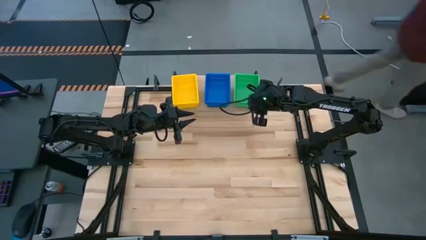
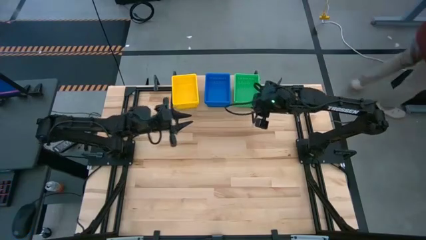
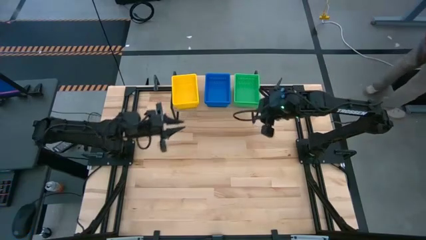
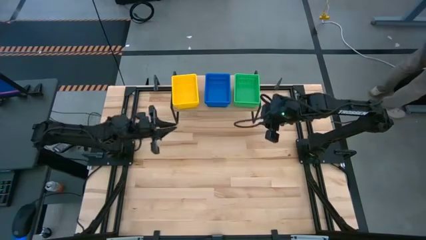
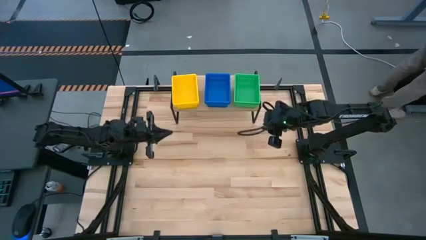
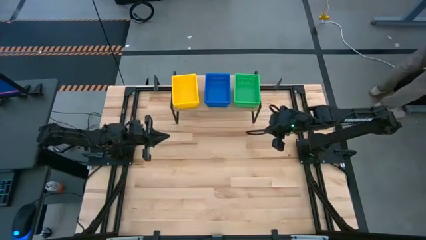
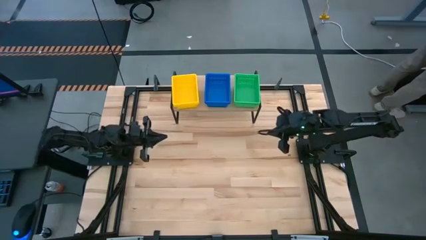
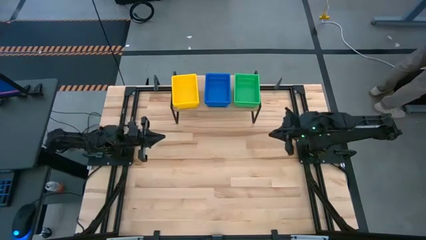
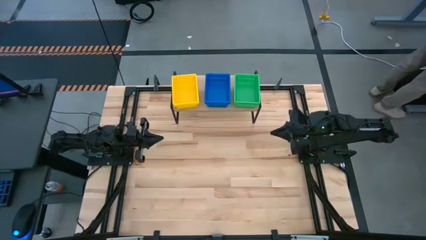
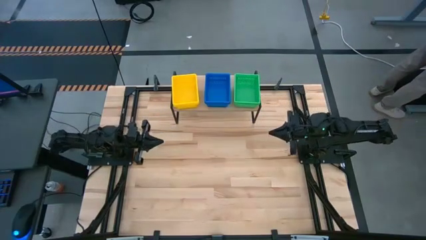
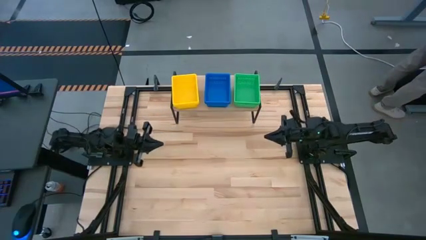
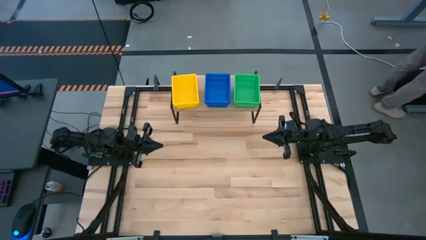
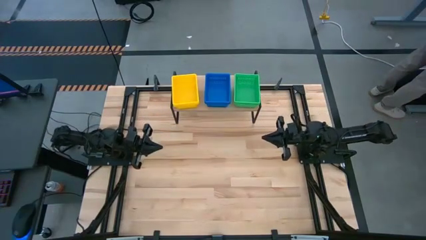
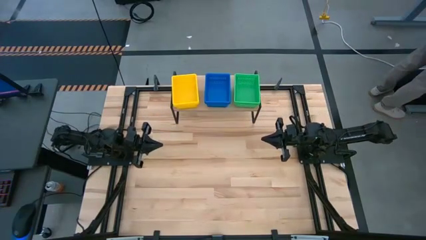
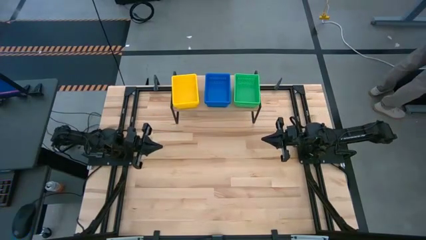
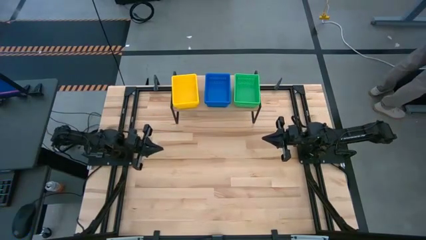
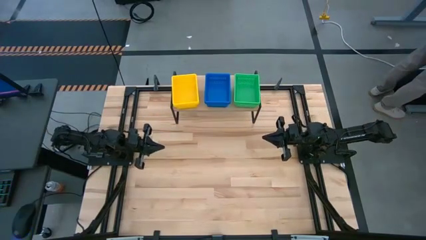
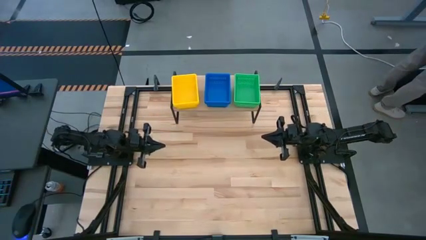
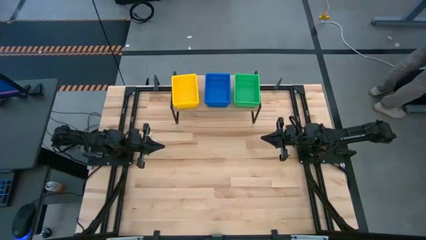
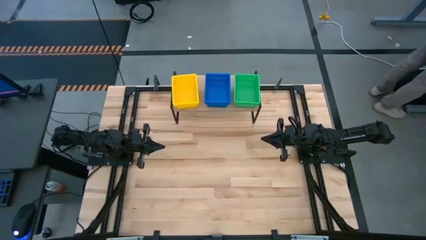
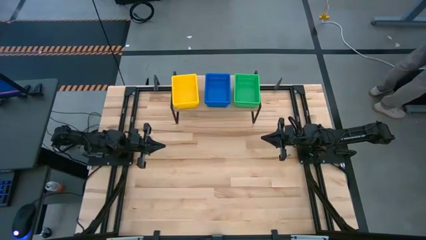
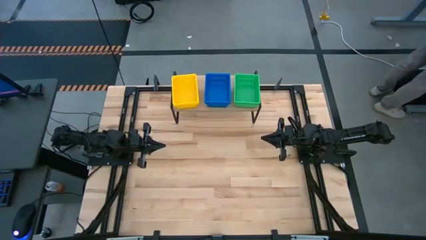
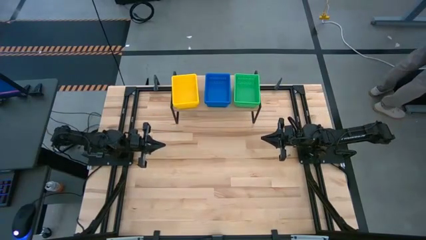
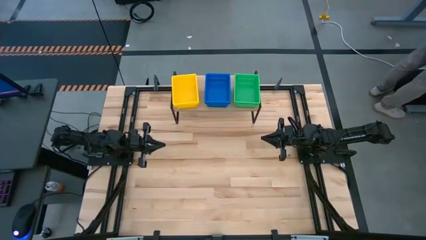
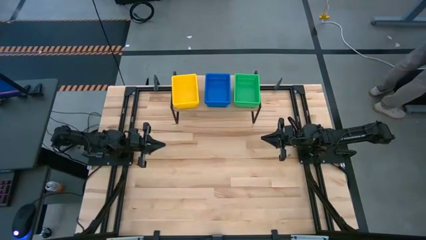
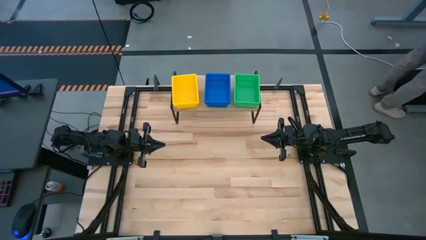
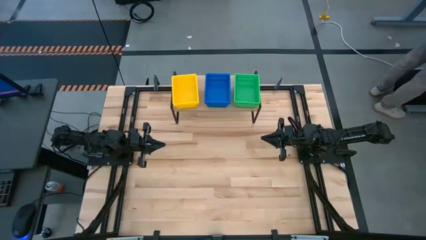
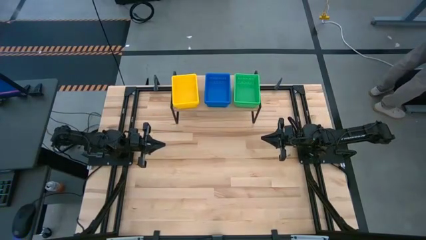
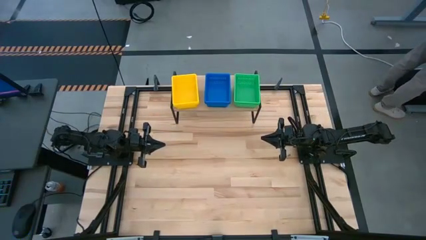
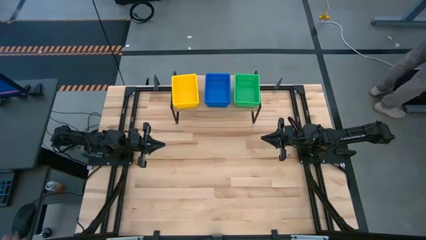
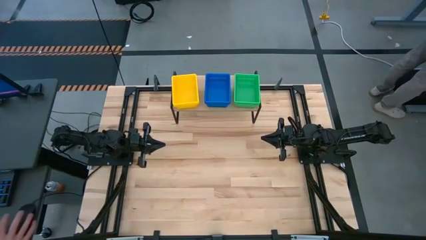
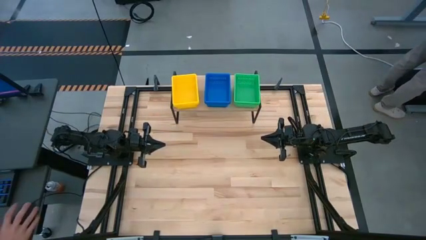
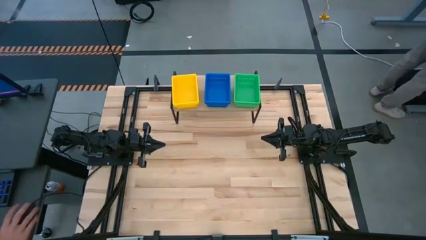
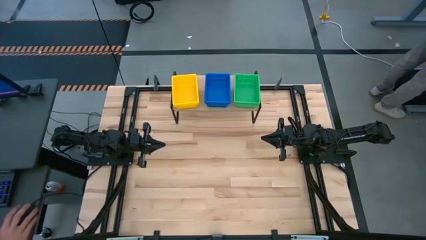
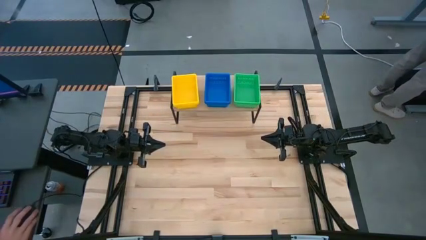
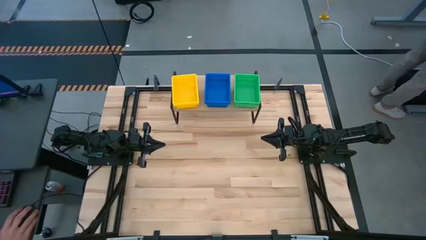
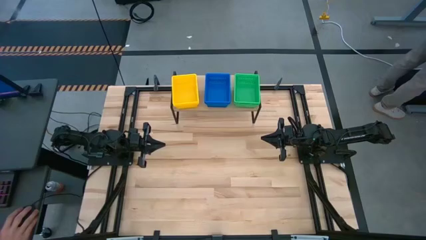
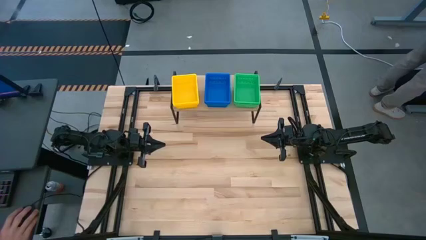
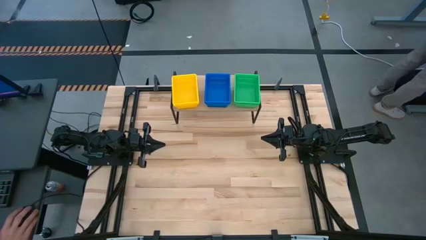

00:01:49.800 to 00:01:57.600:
Task: Stack baskets on shelf by color
Return to Home Position

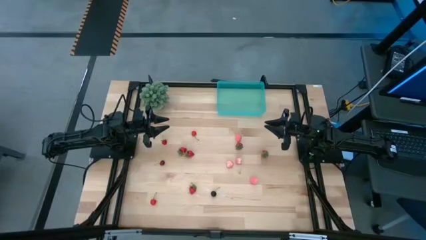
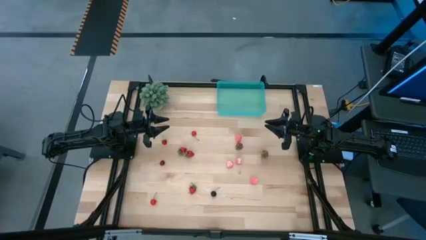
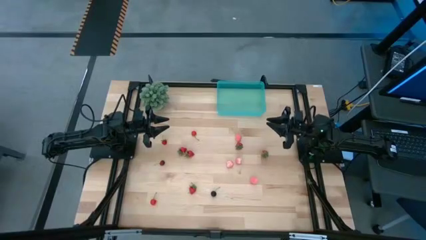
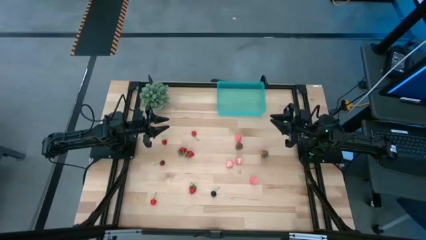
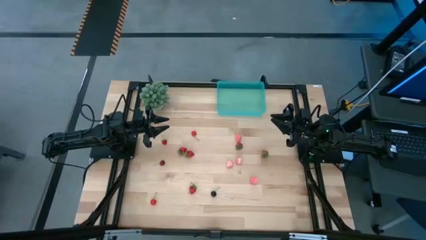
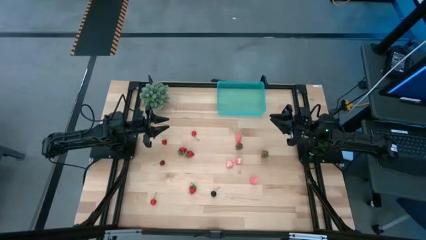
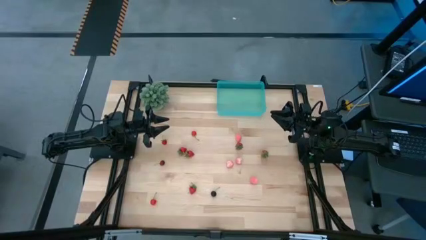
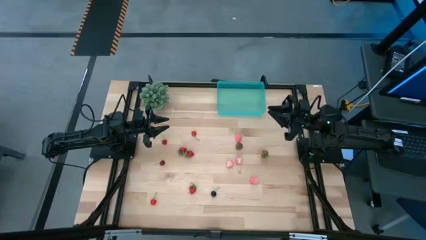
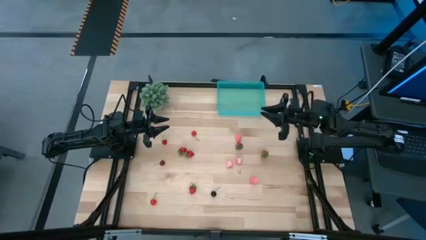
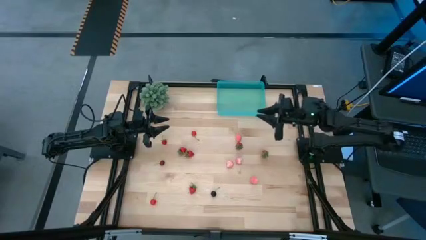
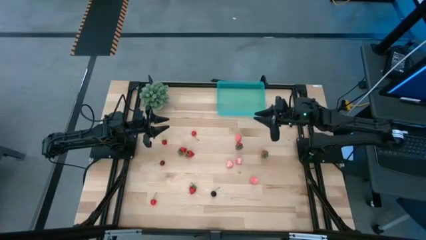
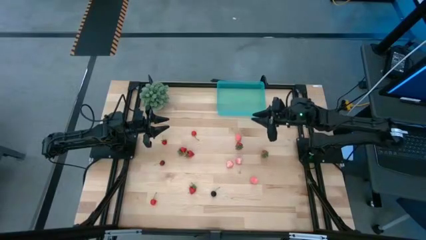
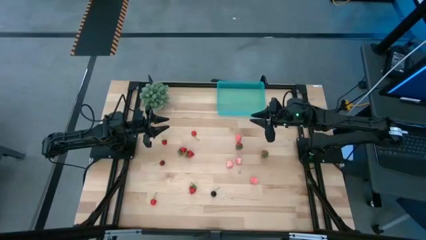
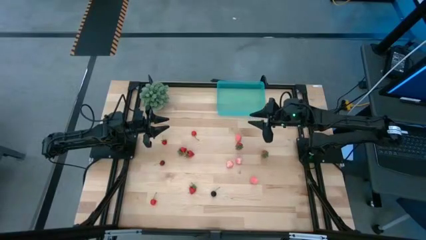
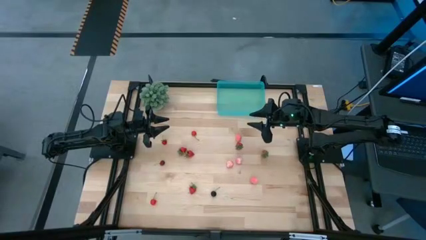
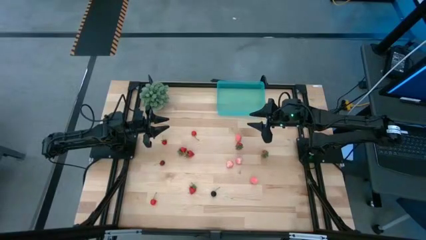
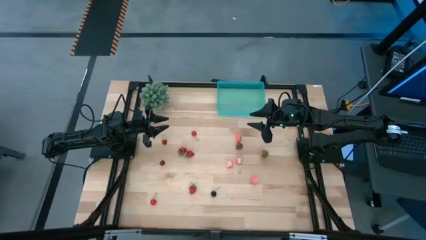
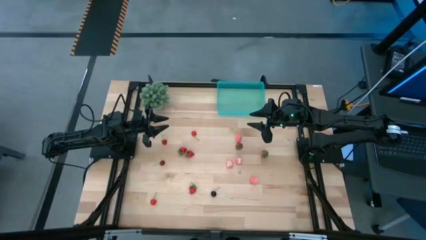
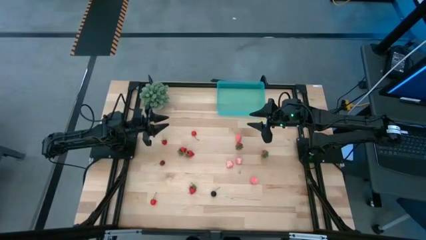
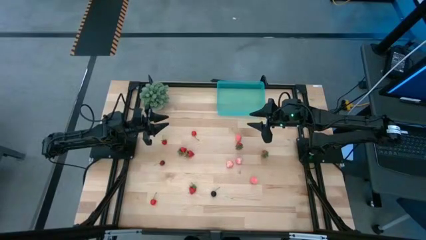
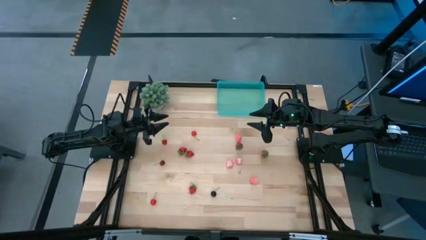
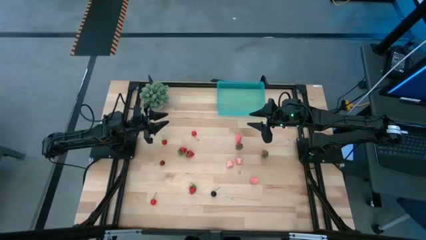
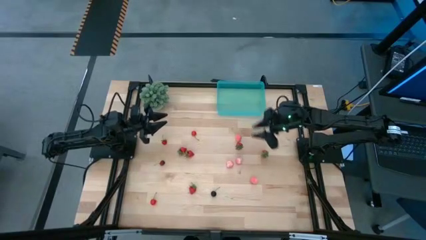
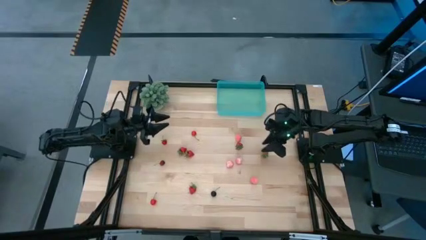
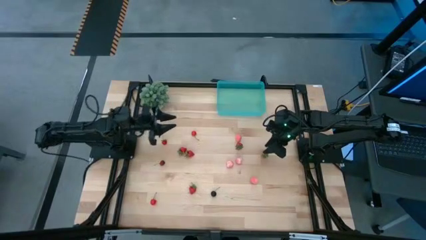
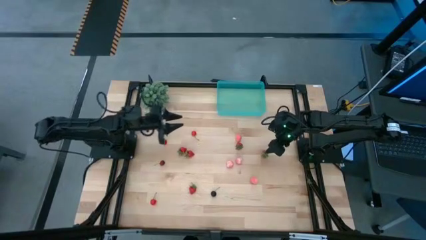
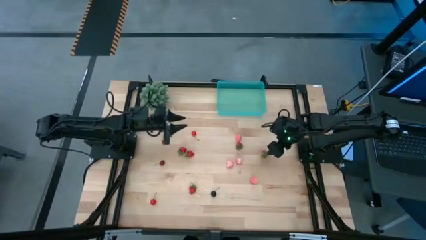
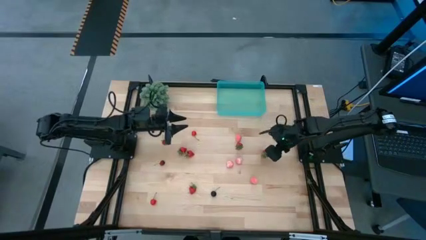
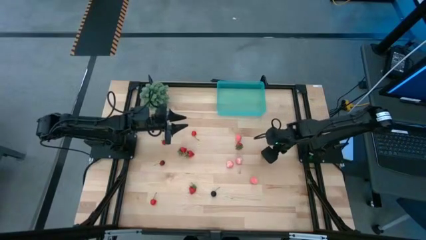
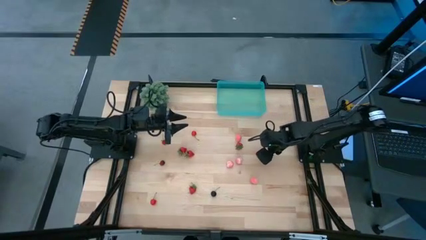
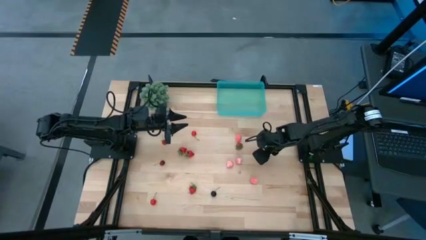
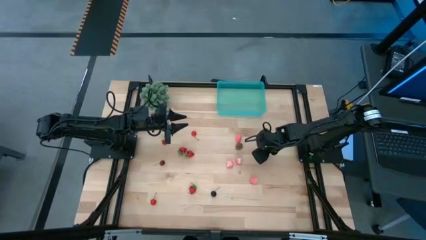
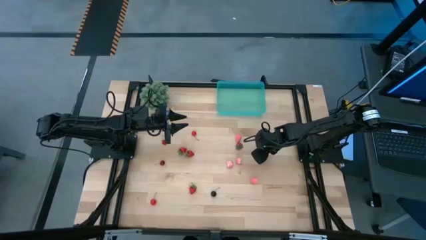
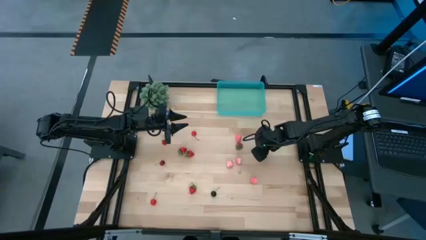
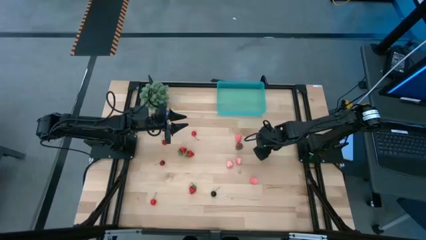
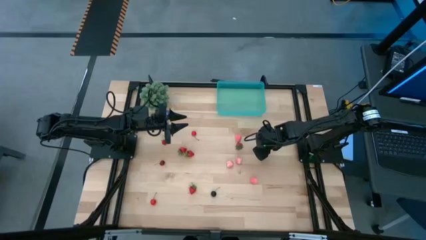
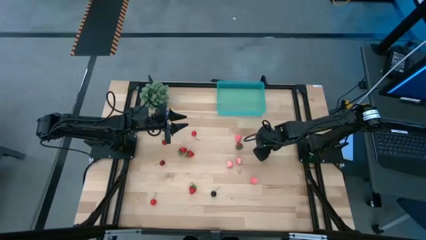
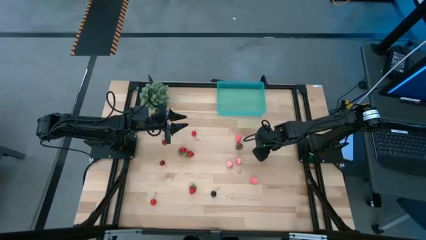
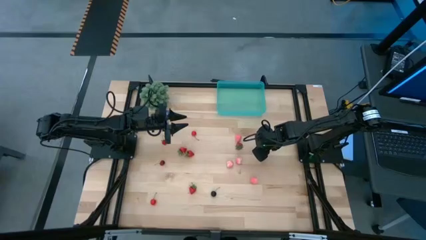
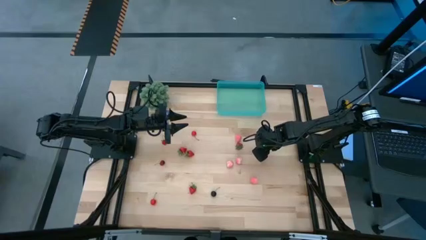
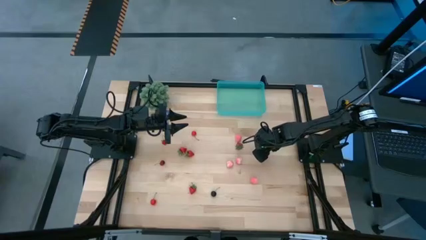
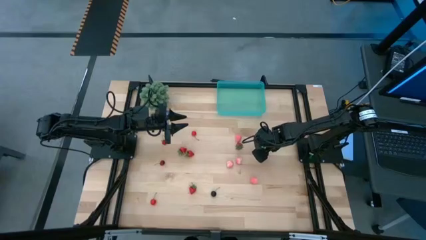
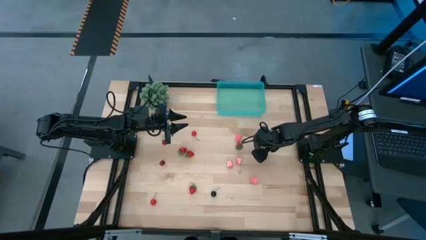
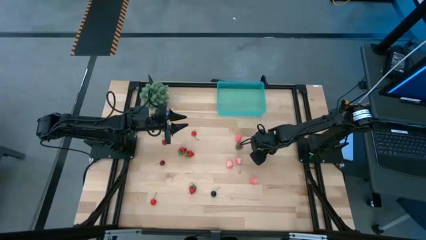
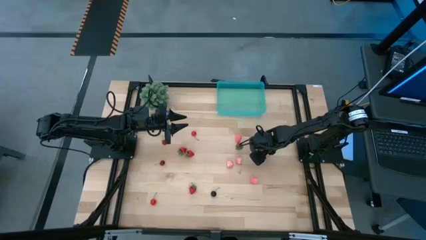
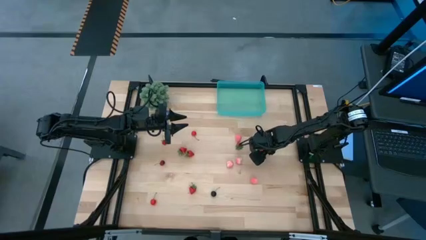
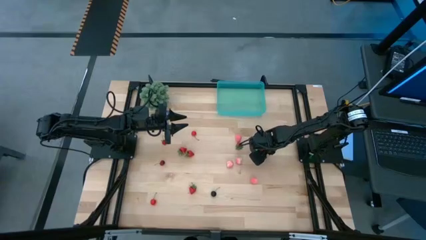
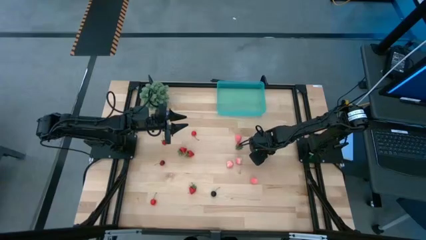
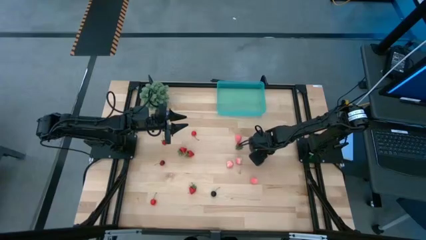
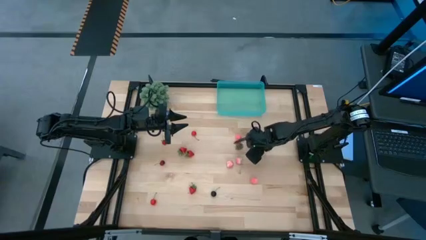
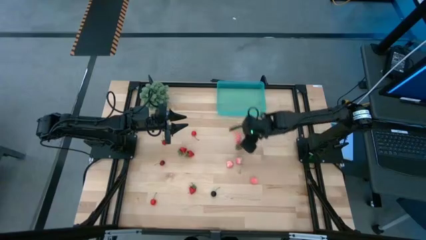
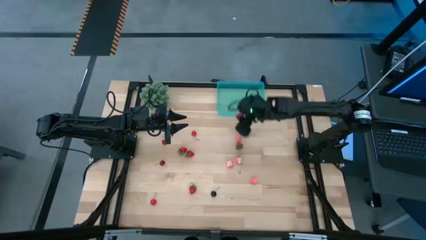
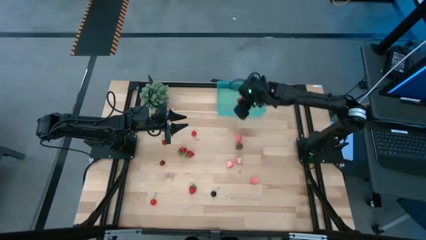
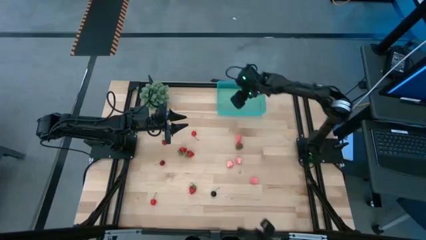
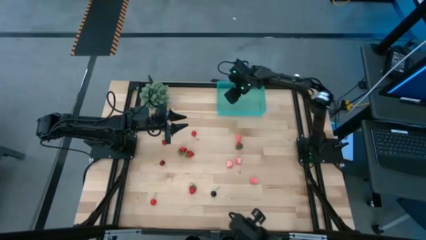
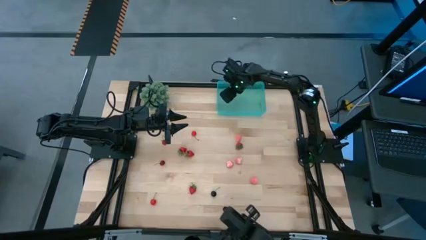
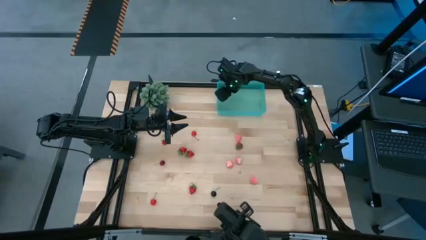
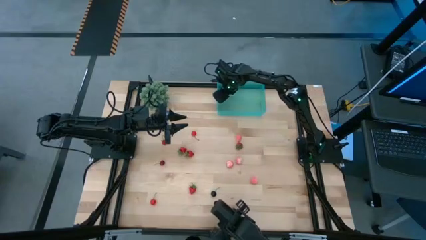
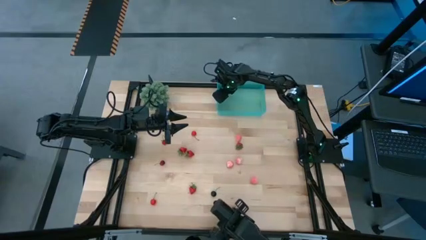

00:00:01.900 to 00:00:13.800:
Task: Pick and placing Produce into tupperware
Put the strawberry into the blue bin
